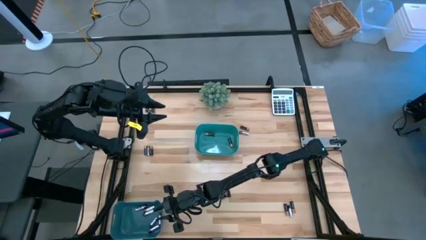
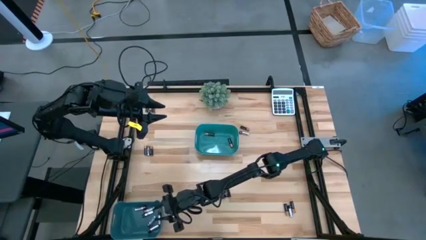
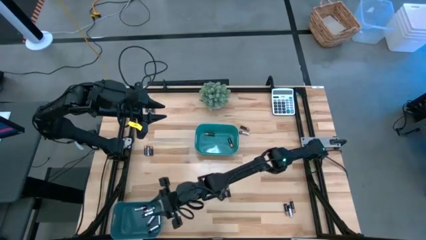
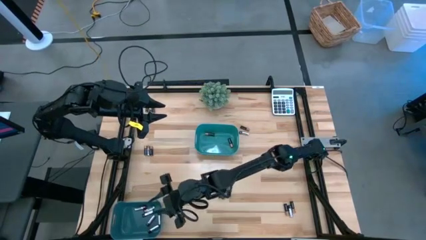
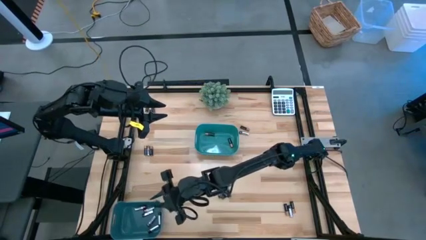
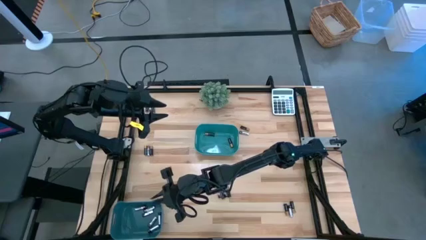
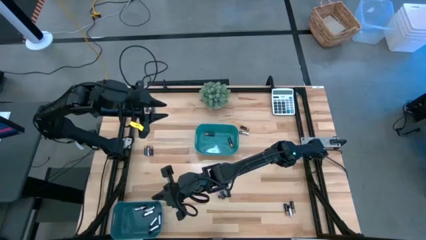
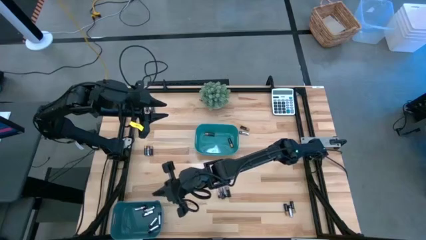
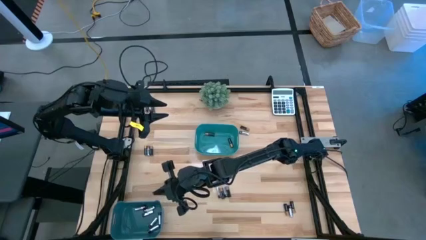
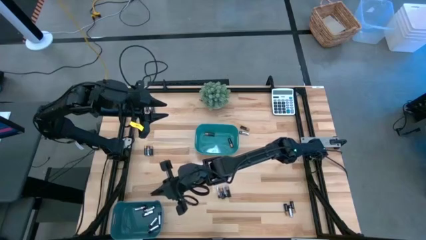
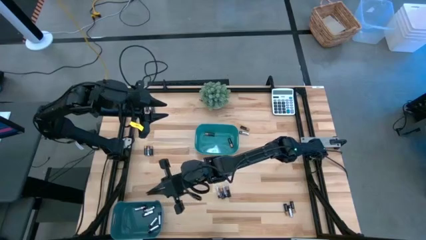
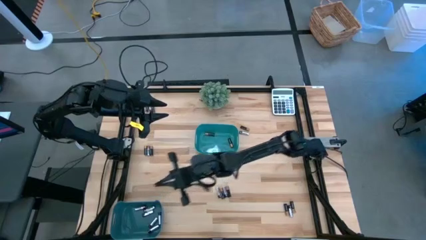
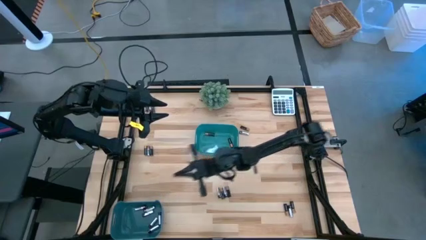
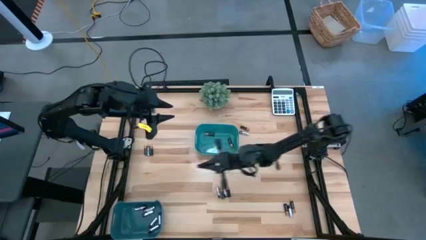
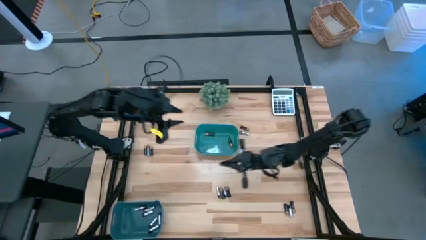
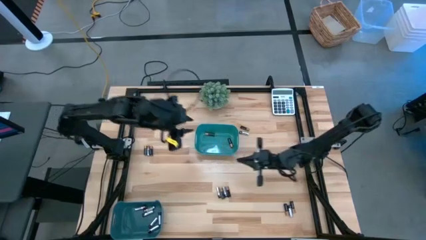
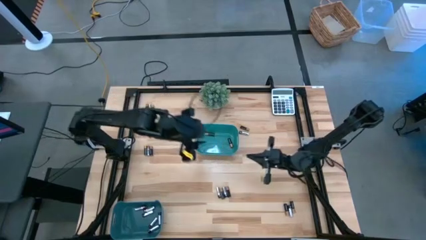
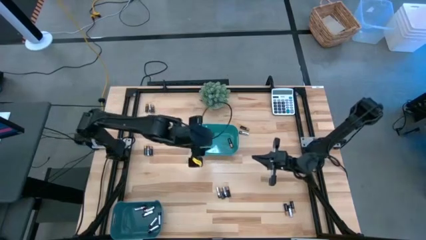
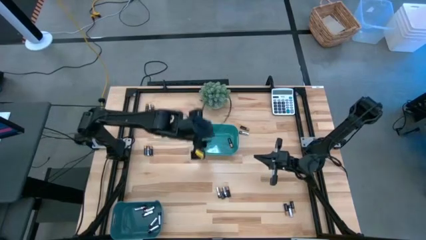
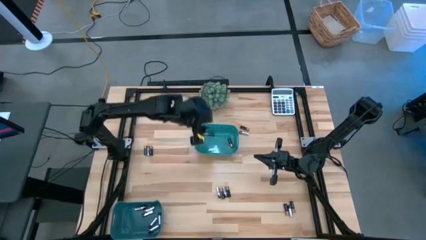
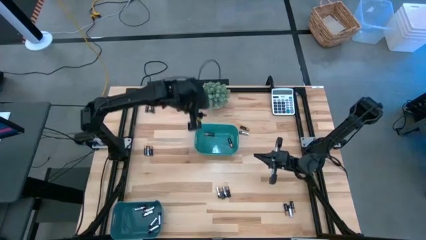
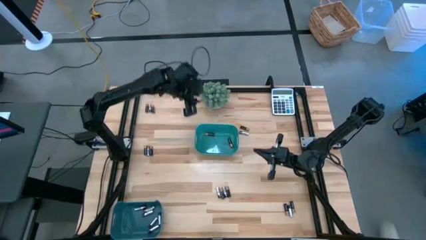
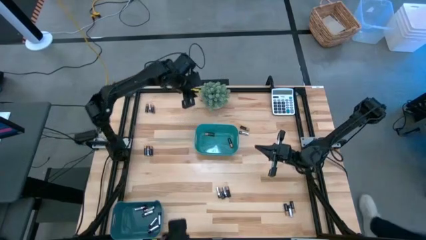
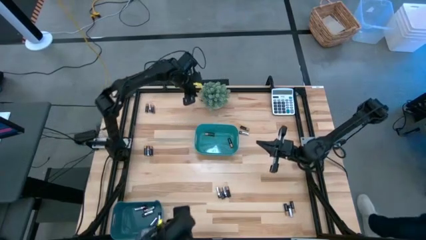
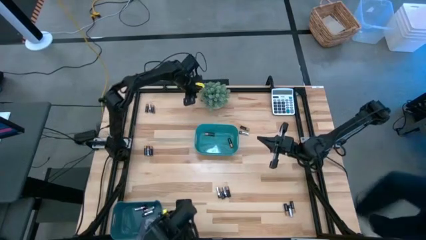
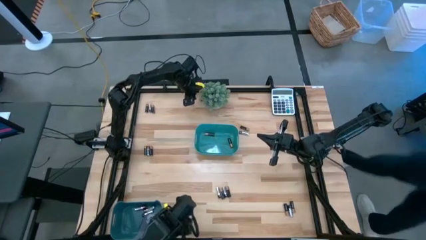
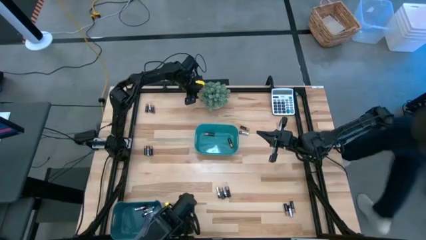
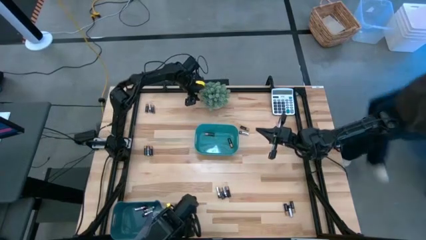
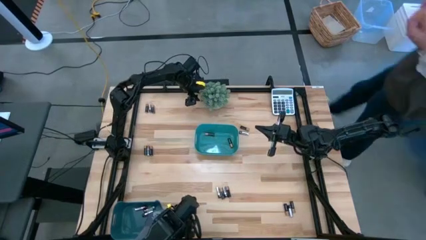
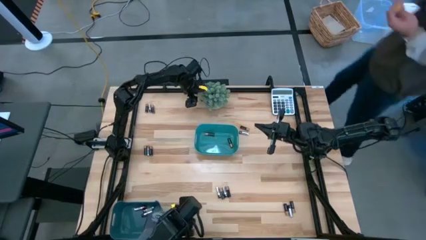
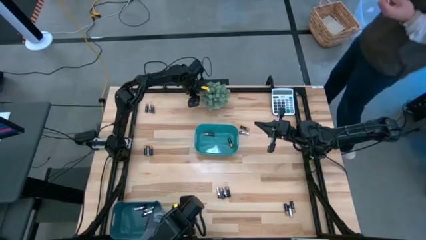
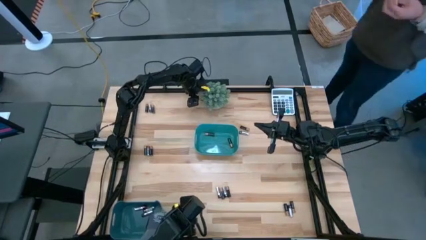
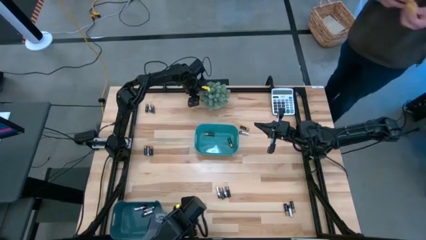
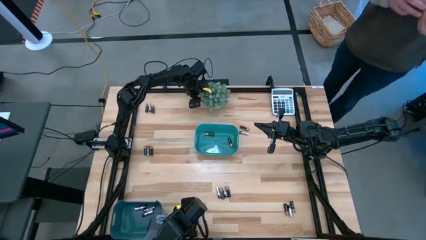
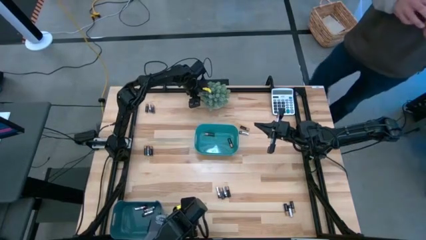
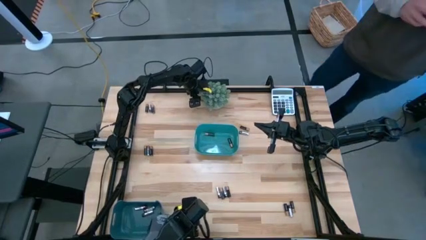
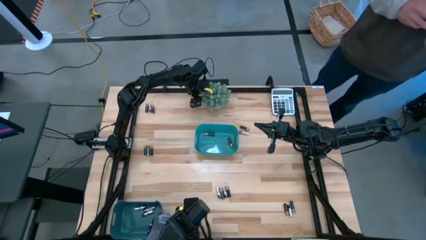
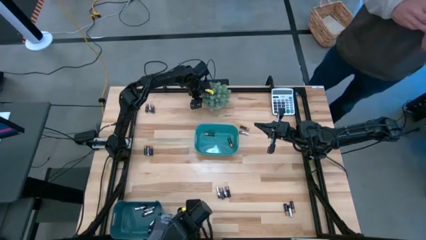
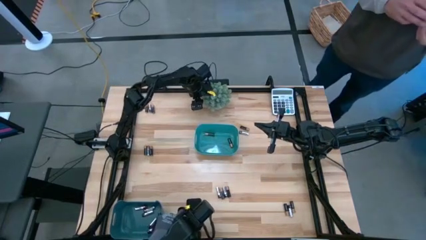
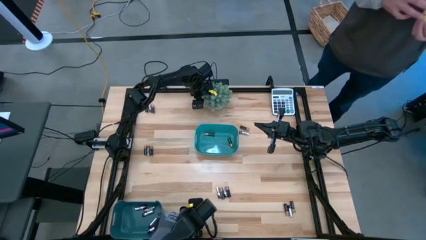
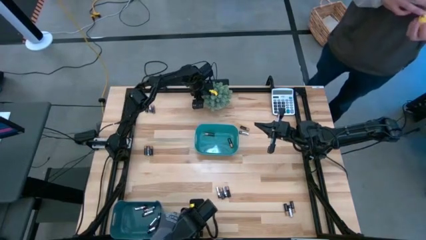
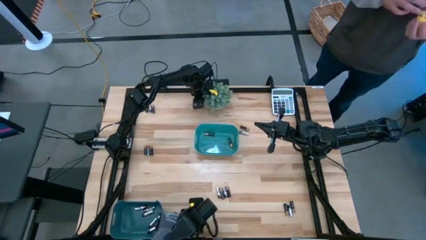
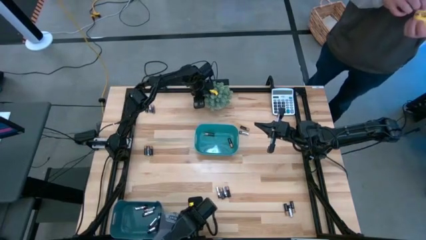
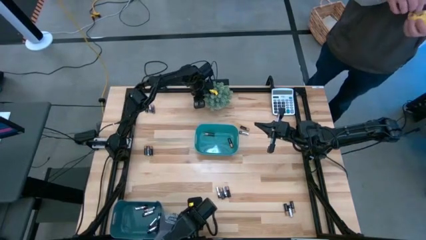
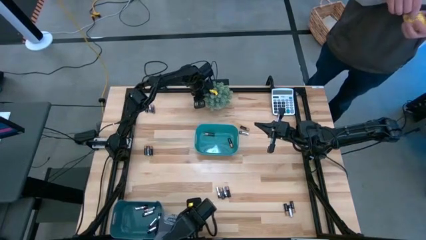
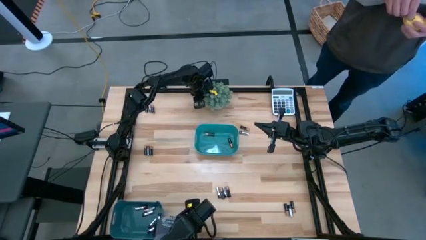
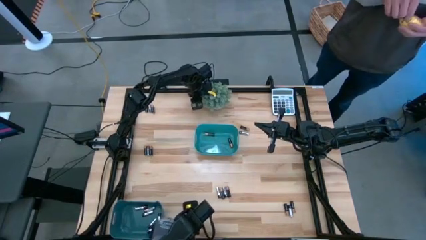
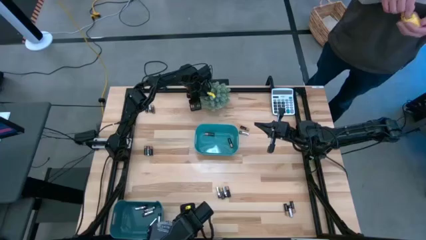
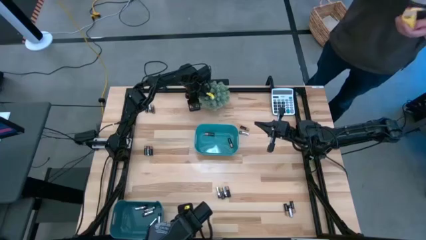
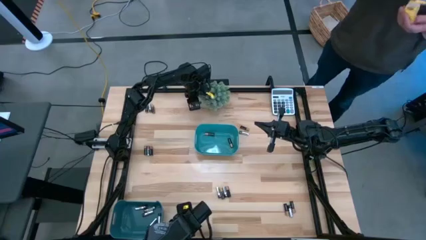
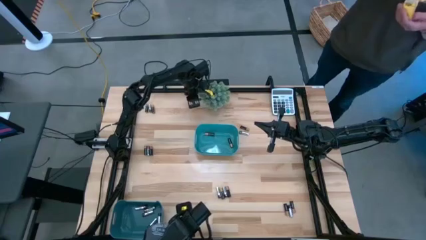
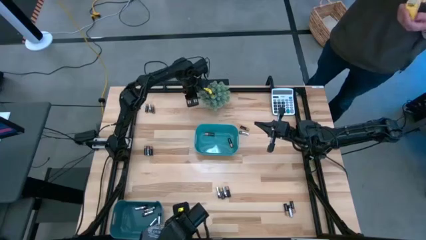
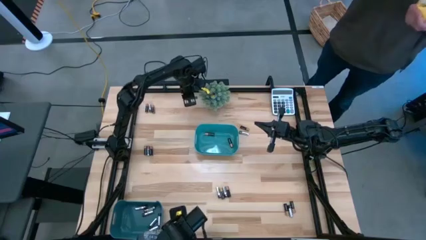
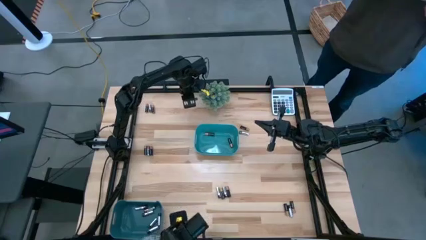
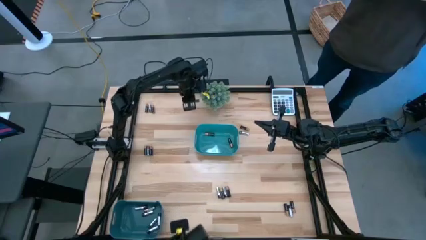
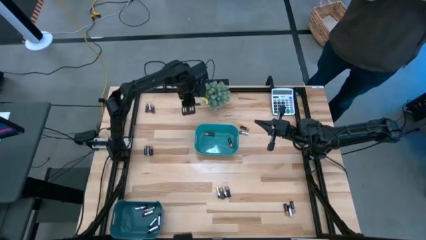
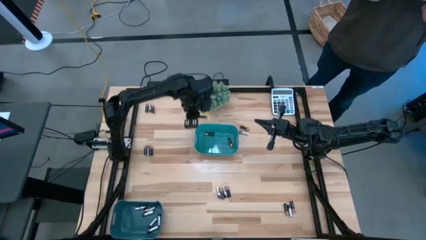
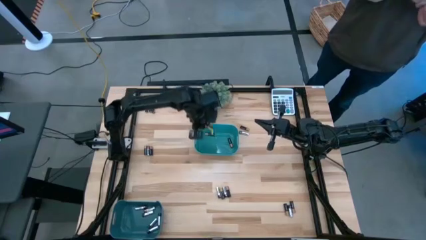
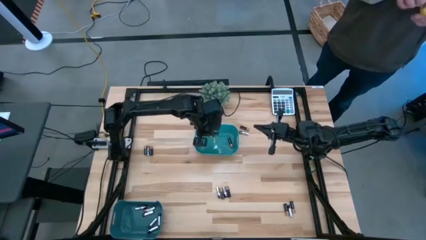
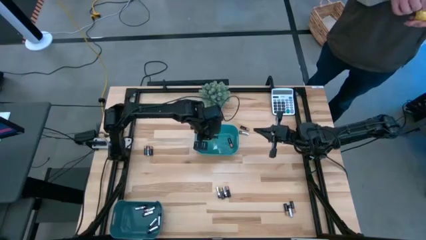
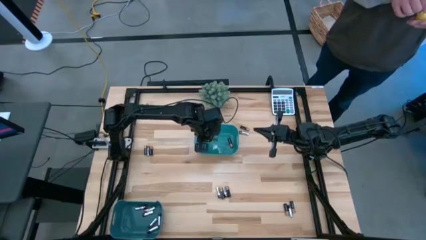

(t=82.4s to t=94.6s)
Task: Sort batteries
Put the black battery into the green bin

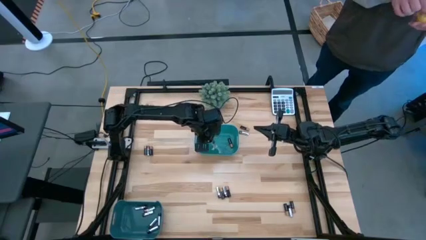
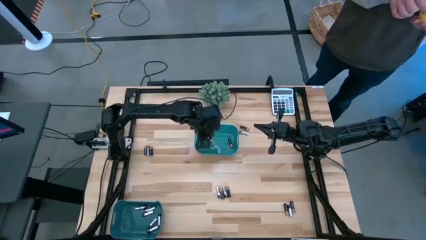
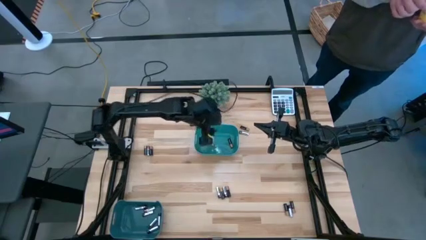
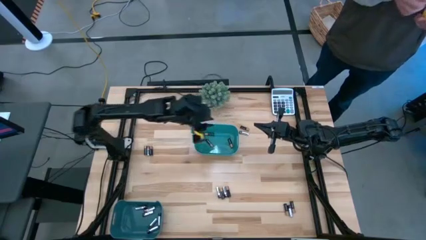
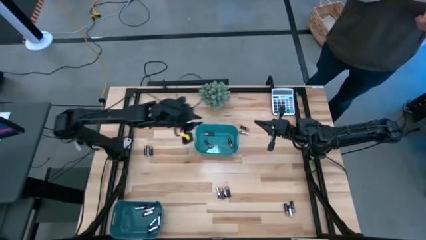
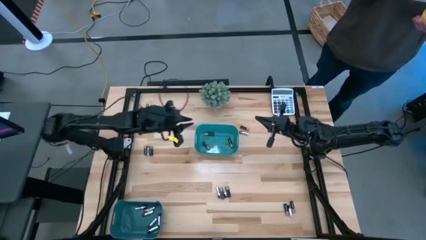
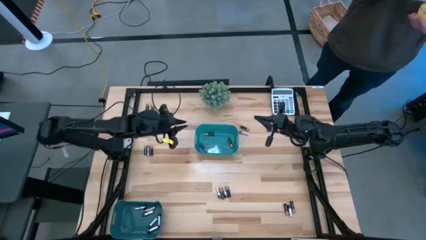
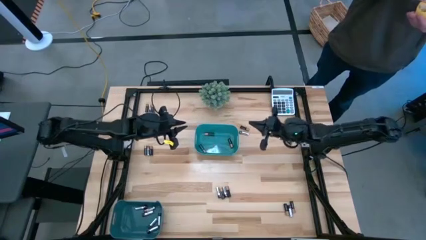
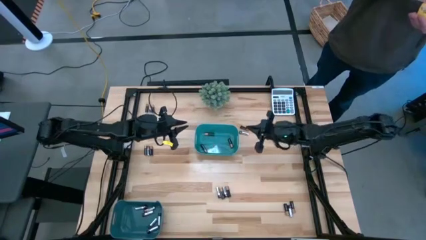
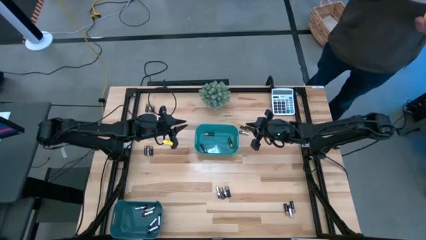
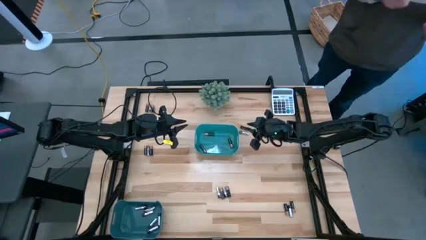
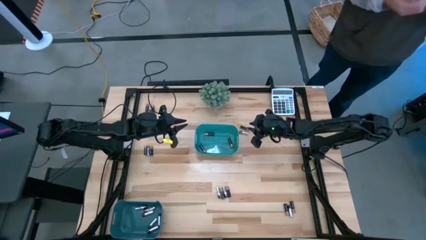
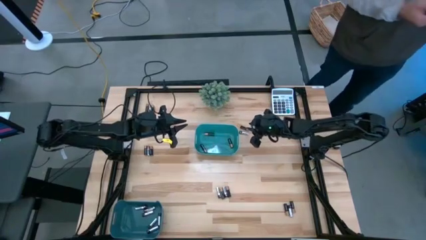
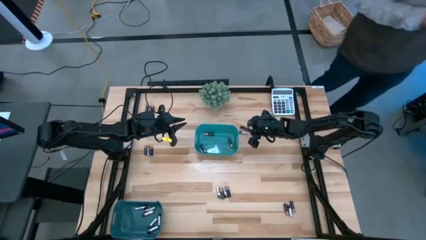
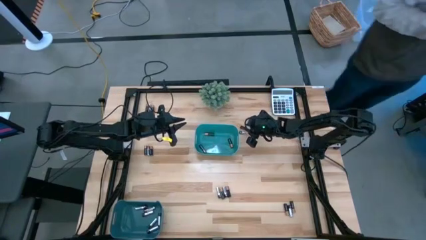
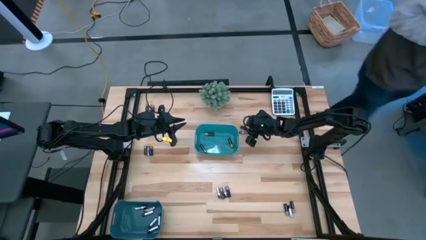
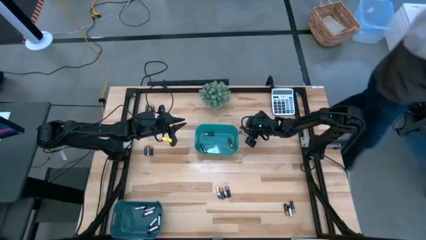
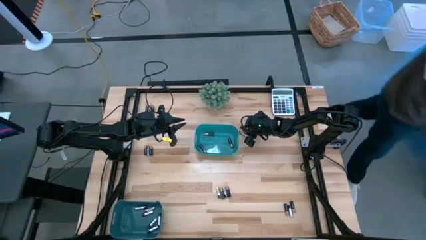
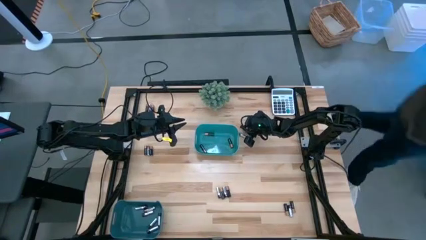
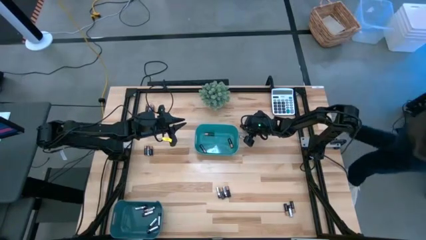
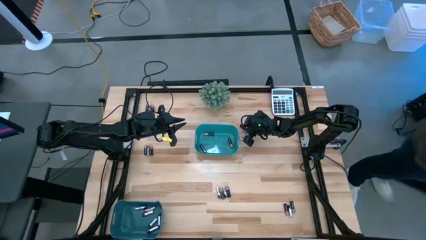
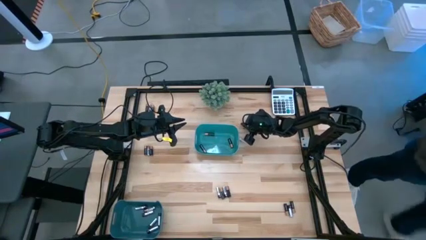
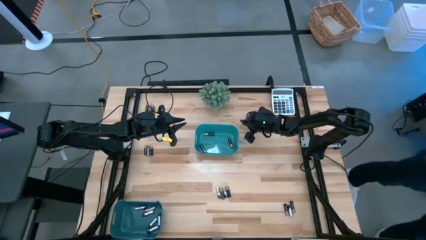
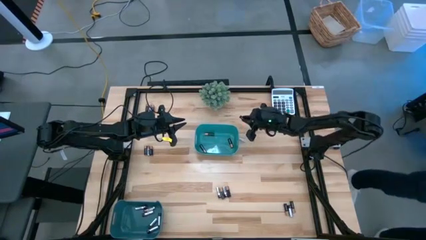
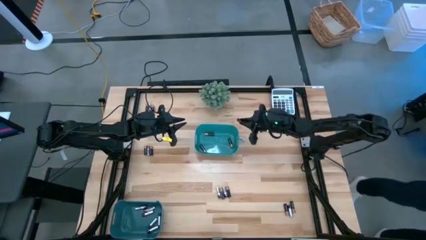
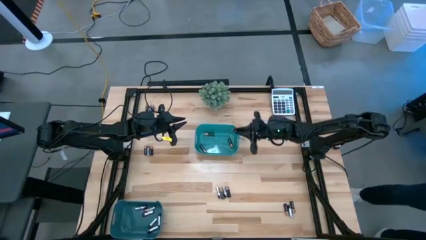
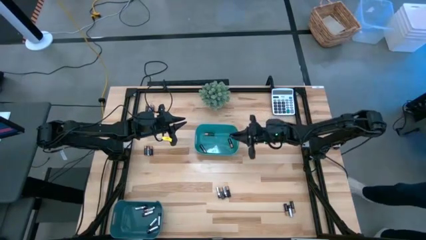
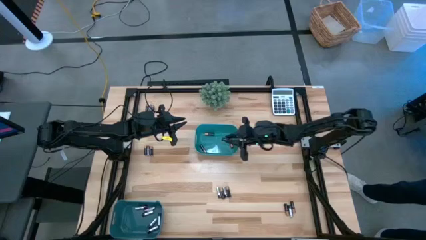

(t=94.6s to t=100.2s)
Put the black battery into the green bin
